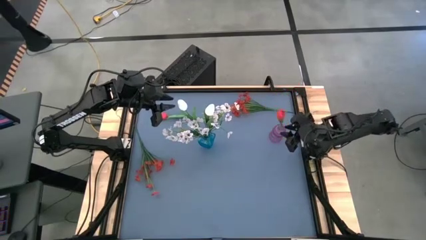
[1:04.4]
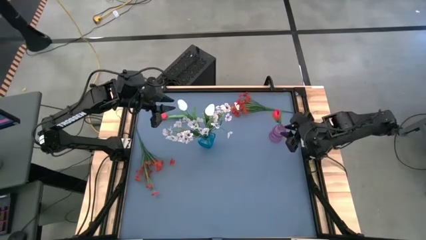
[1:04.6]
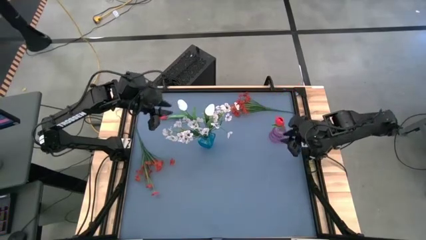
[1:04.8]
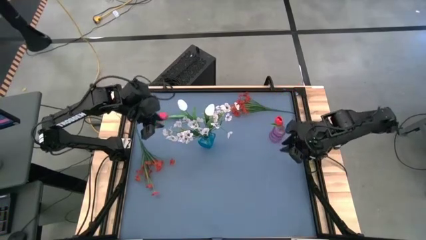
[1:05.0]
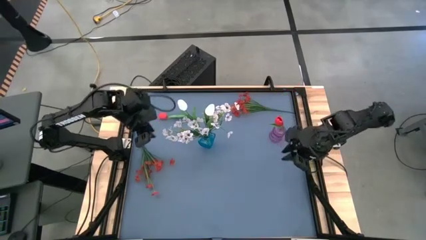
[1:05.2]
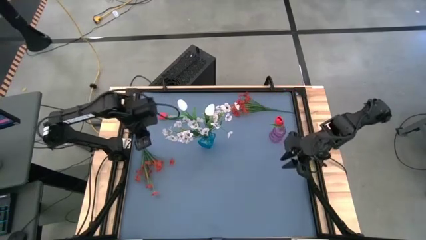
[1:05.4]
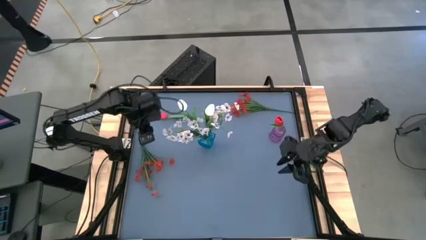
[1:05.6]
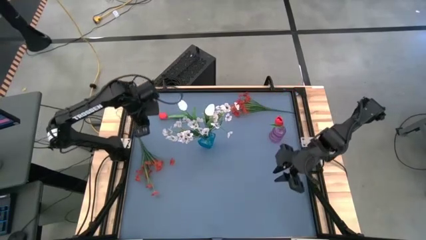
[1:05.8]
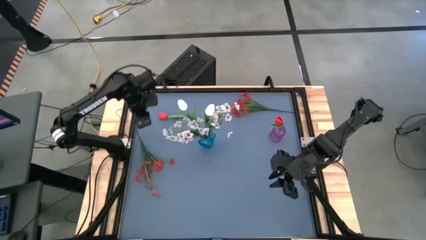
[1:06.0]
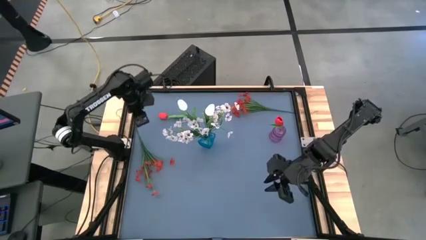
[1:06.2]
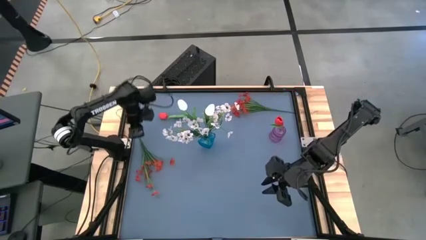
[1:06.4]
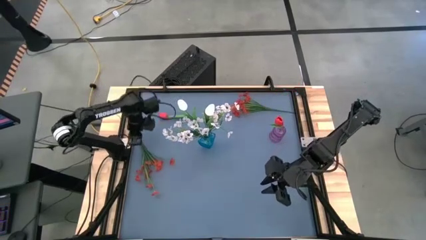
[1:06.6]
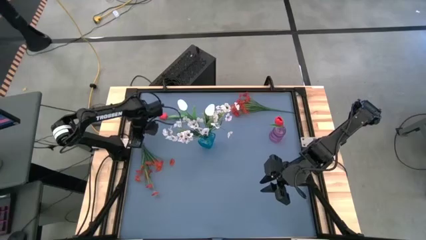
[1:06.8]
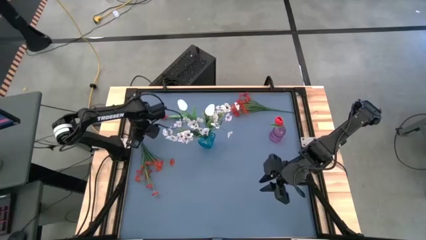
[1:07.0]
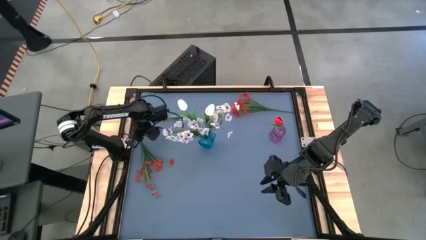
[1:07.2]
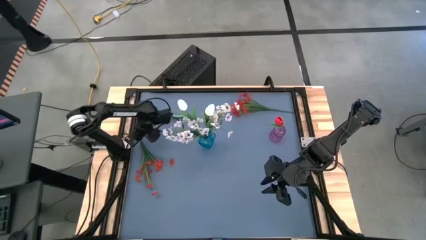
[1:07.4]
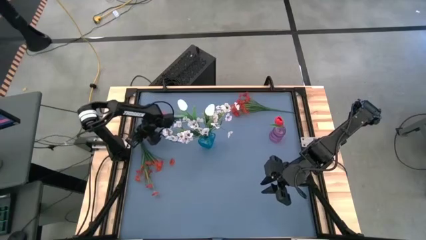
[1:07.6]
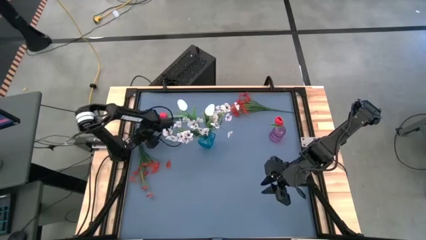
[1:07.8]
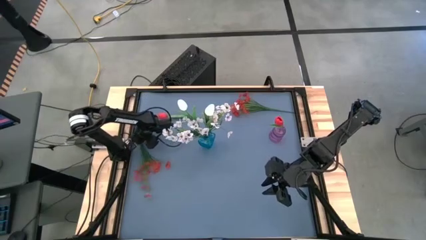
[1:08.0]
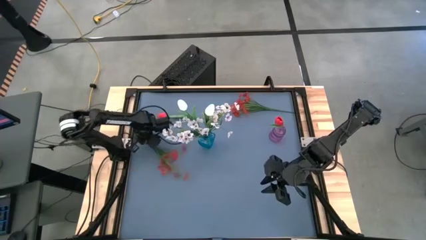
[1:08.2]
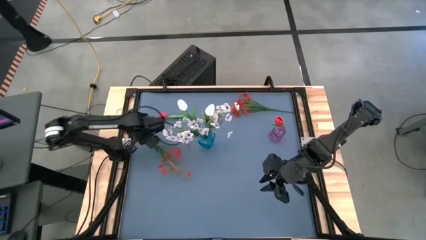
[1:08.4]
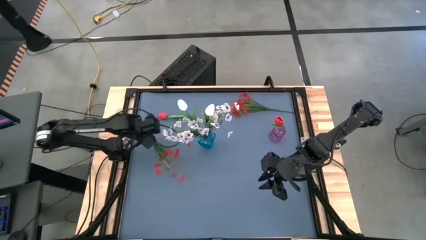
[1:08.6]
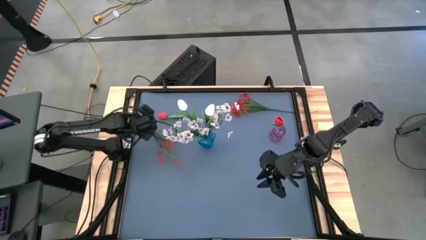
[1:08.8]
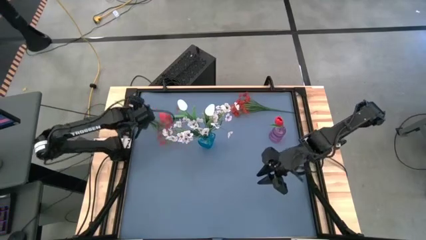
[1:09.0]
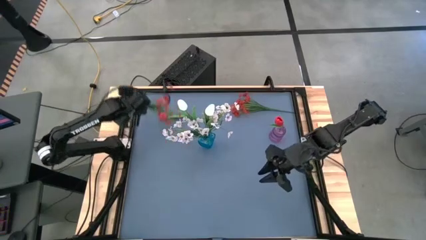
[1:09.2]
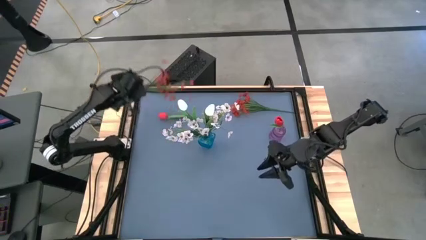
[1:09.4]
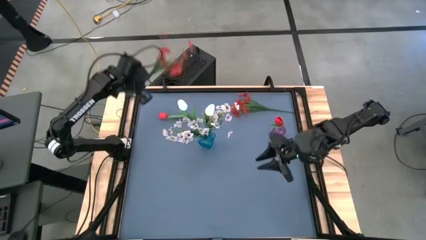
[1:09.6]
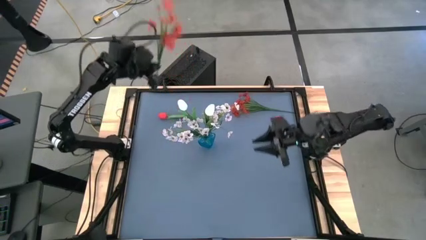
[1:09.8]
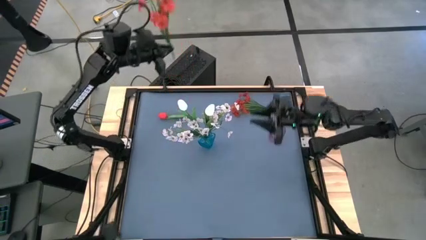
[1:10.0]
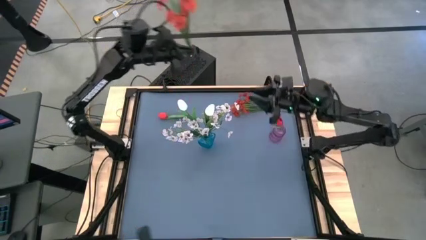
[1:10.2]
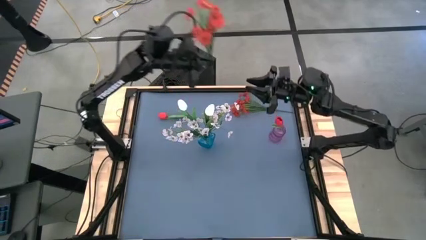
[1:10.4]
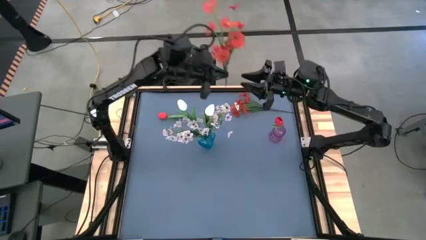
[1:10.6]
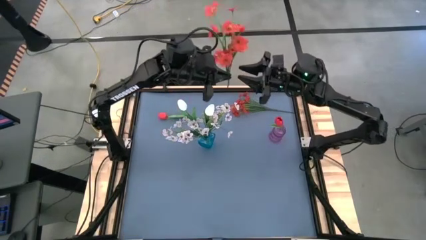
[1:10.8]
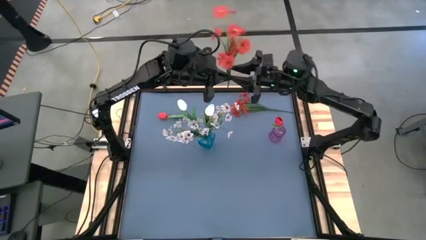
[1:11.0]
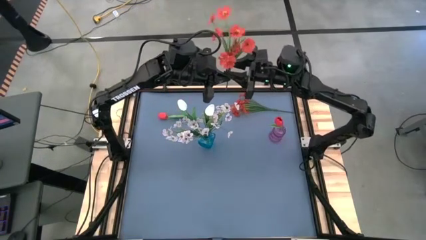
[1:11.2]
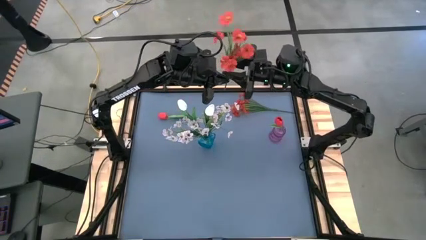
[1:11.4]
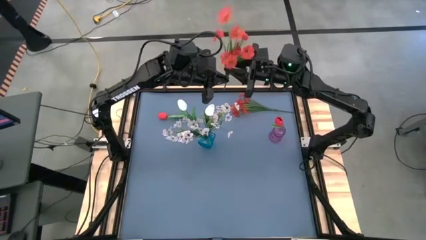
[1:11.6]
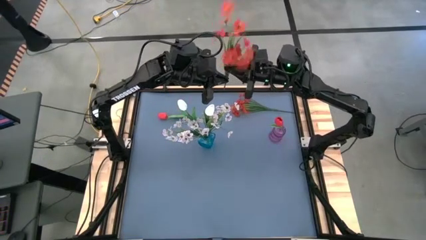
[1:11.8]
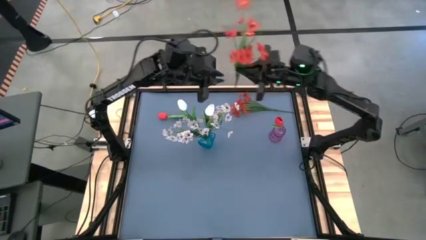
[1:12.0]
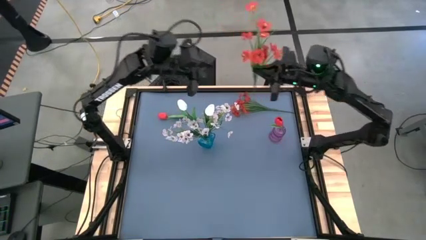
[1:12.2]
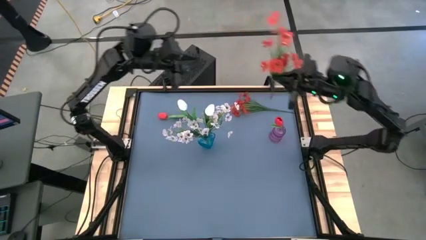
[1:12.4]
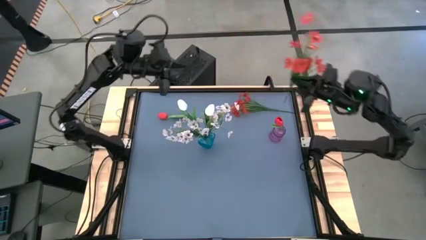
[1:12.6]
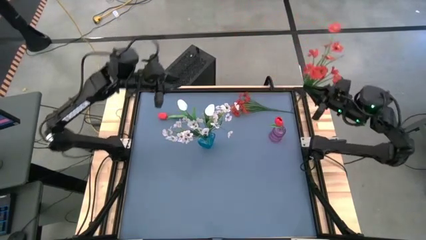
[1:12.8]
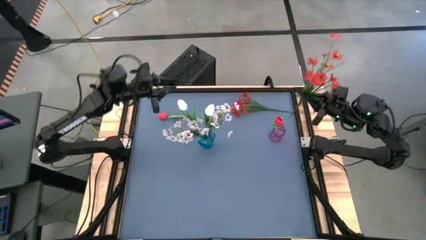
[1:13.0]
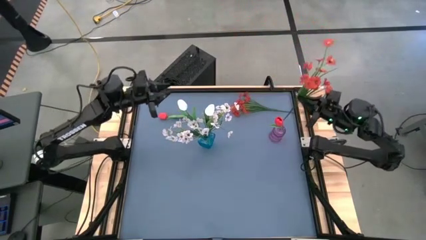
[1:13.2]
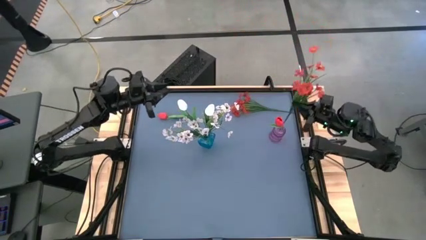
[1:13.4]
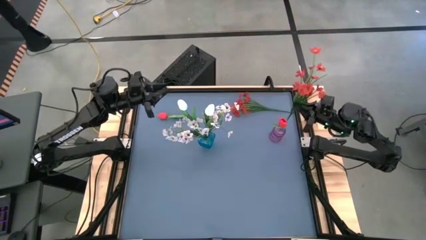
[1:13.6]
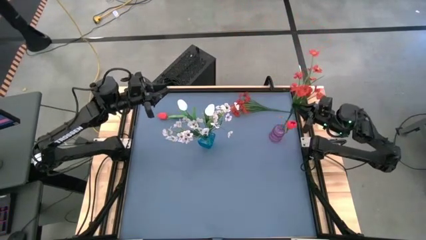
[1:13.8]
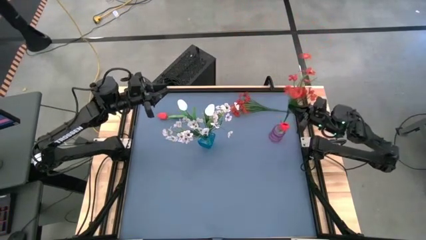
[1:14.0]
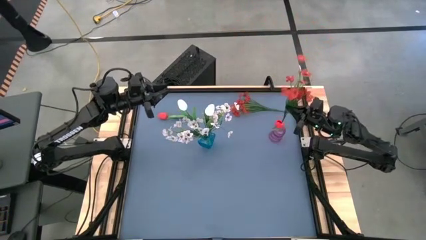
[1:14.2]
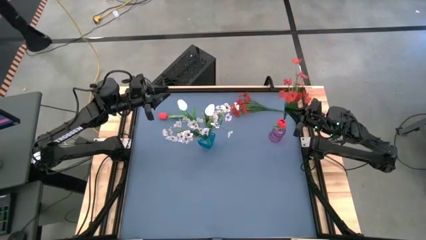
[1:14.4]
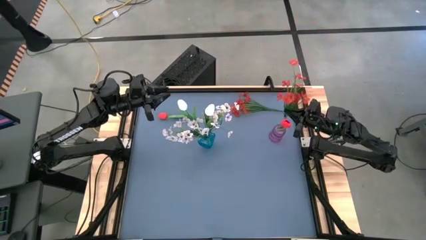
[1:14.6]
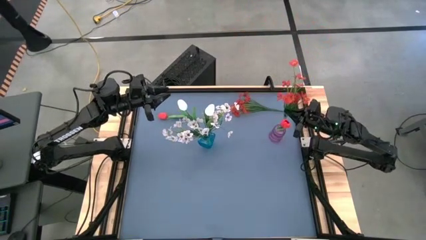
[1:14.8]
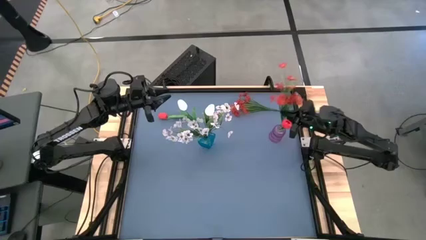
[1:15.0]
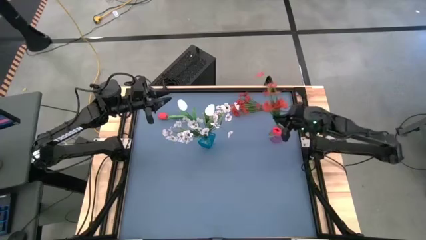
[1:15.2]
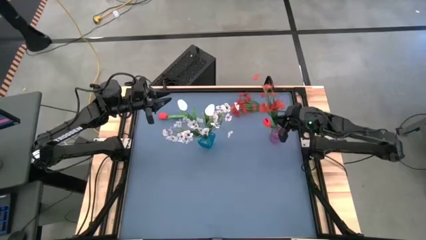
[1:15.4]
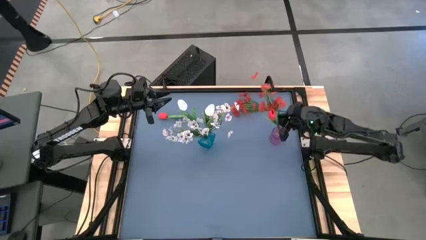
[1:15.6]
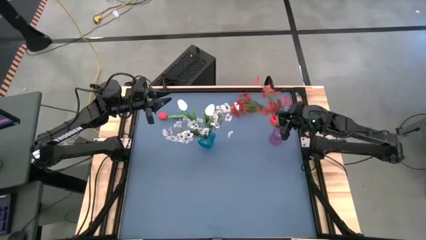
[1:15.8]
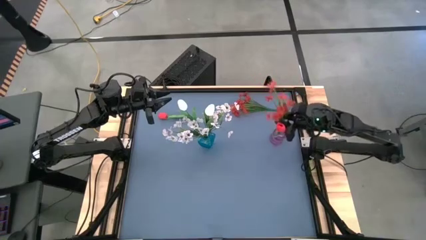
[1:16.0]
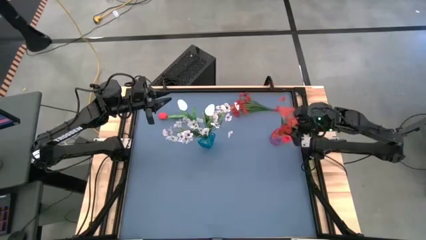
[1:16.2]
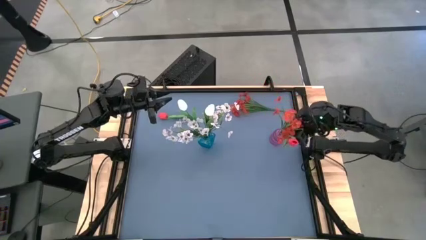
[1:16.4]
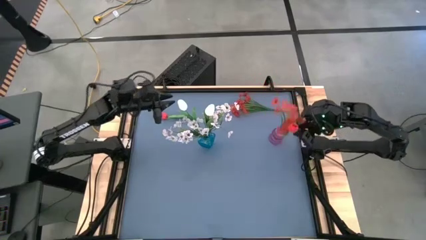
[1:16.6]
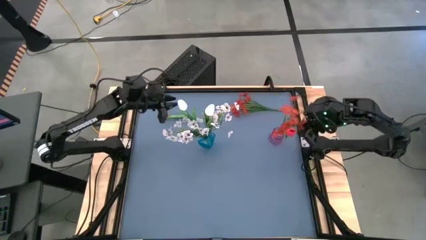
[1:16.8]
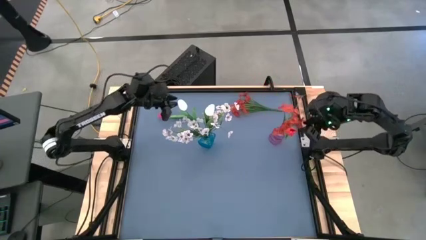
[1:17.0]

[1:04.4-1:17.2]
Task: Sort flowers into vase by color
Put the left red flowers into the violet vase

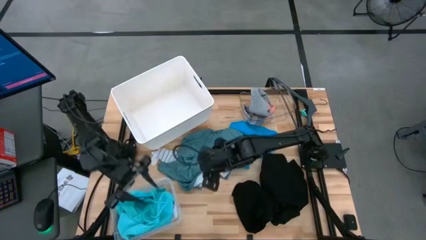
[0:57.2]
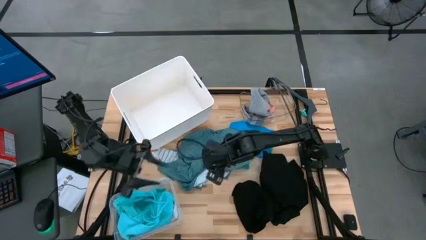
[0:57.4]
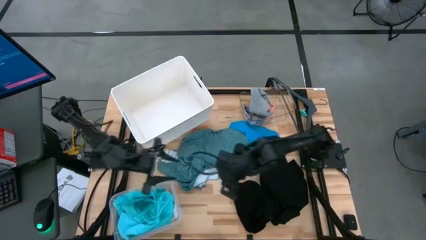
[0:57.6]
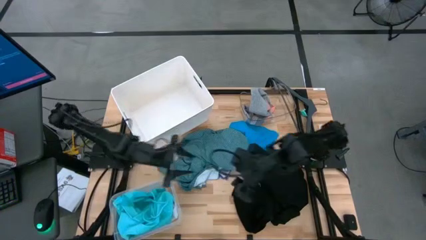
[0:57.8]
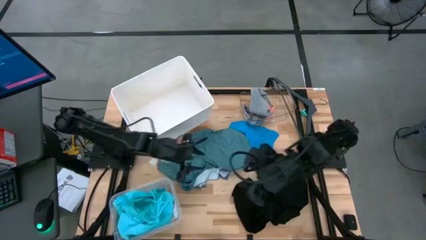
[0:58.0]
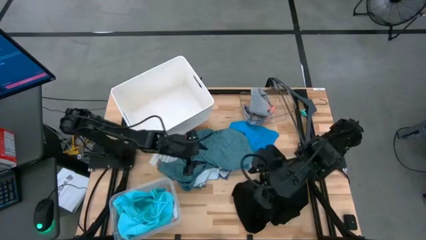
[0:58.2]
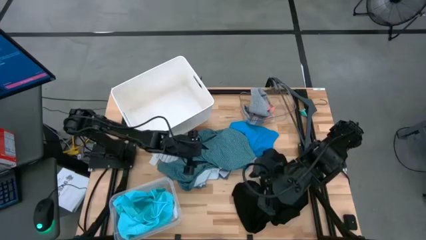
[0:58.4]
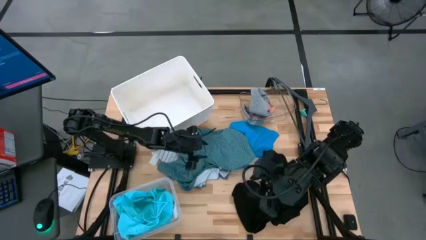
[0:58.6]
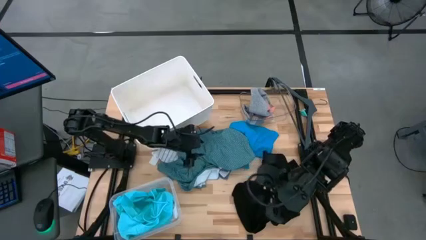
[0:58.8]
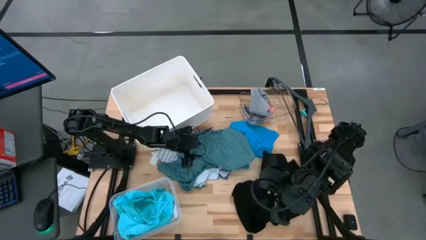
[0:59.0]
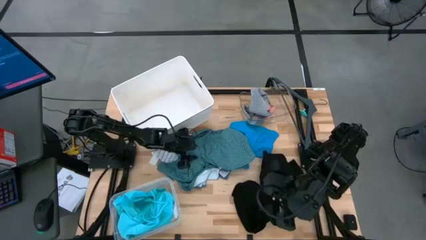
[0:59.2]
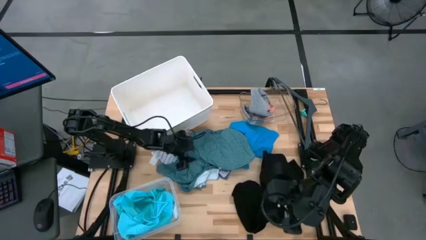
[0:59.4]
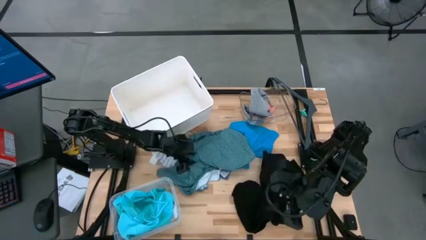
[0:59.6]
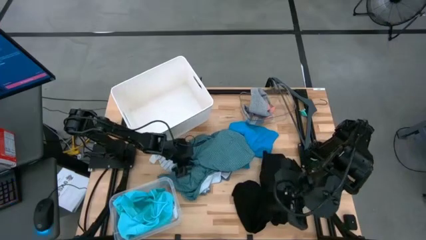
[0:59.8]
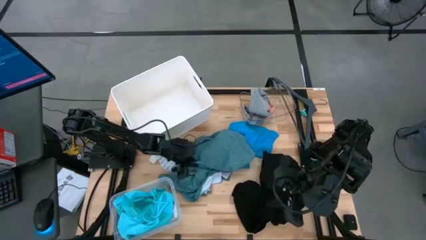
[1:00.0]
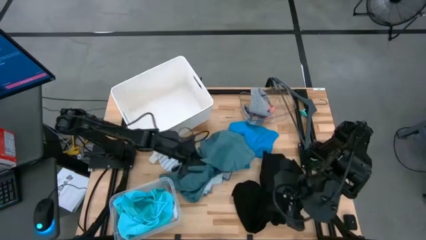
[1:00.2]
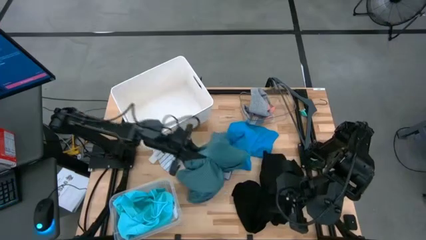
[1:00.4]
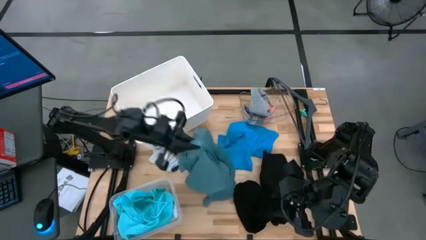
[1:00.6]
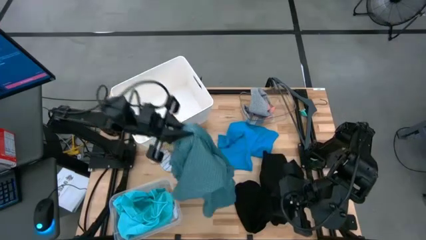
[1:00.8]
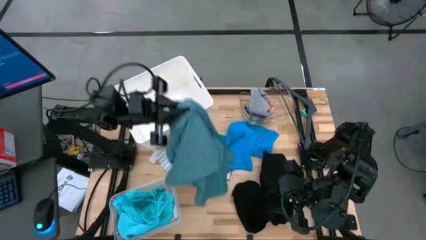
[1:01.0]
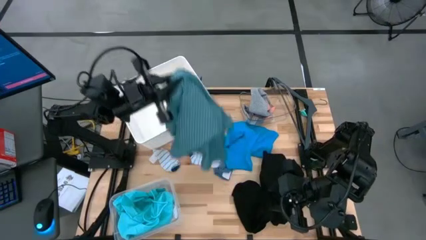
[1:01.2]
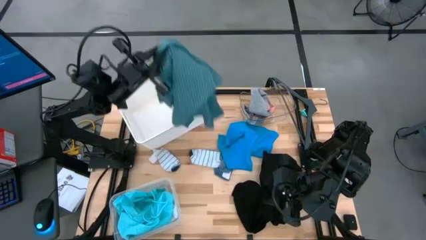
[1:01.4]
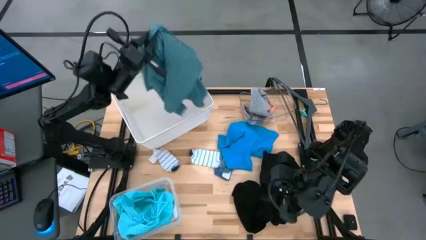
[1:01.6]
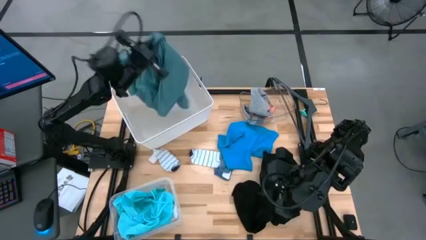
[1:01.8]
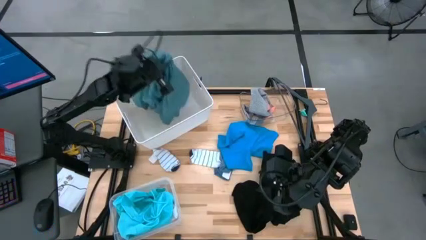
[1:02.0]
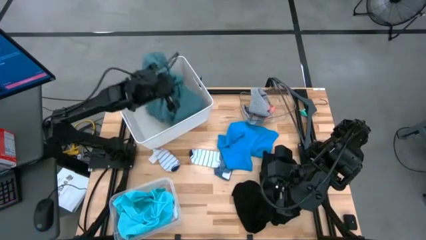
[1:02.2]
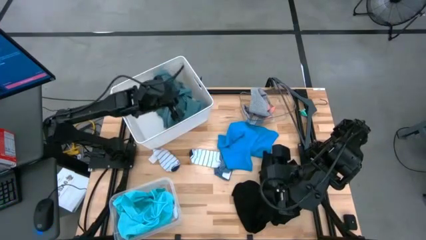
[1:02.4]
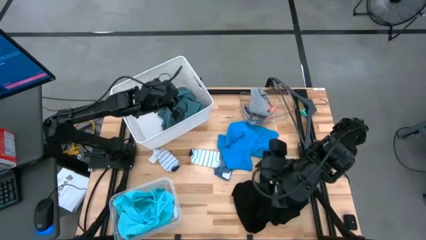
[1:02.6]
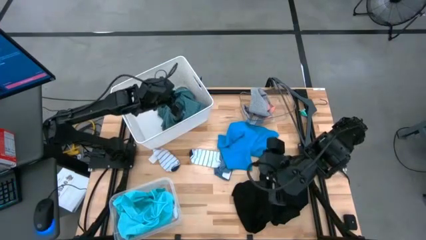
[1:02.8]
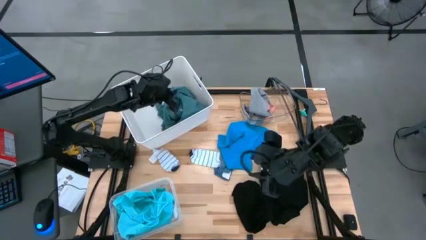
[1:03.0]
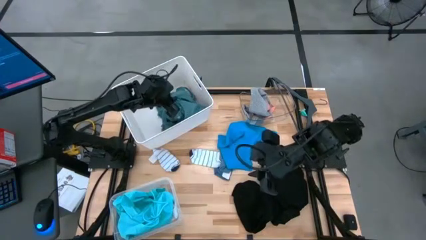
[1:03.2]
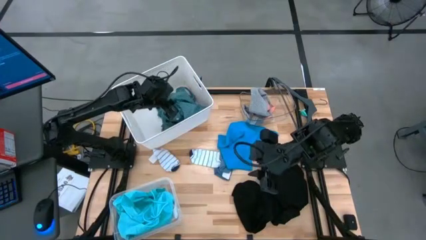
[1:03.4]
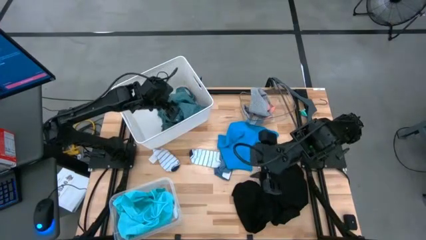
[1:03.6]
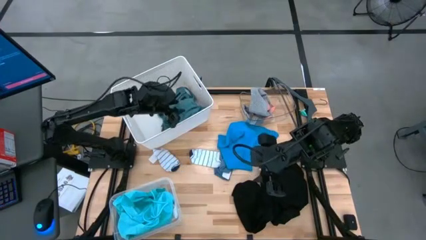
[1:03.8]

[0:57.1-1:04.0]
Task: Pick & Place Cloths
Put the green shirt into the white bin
